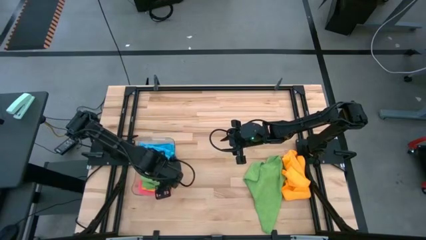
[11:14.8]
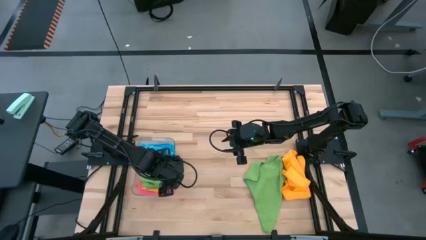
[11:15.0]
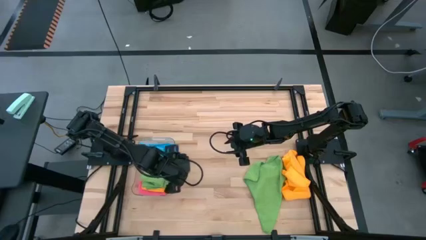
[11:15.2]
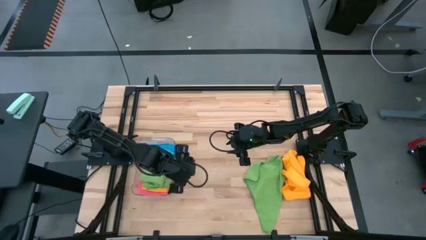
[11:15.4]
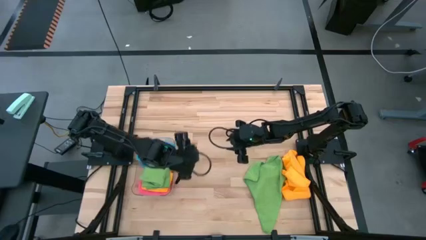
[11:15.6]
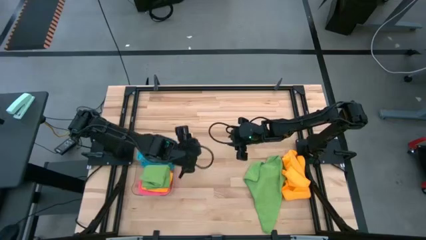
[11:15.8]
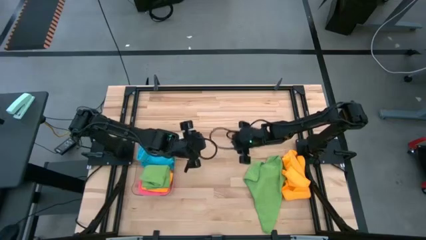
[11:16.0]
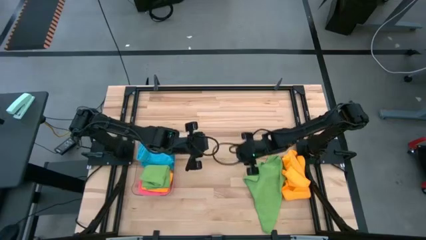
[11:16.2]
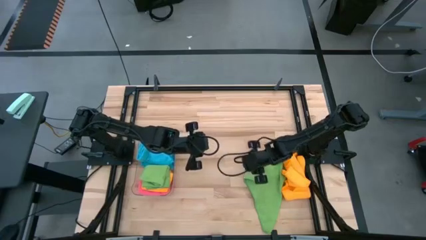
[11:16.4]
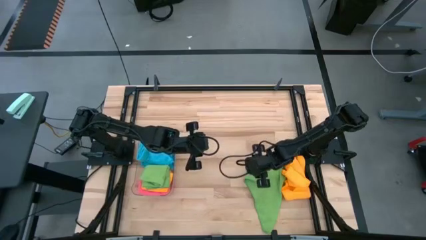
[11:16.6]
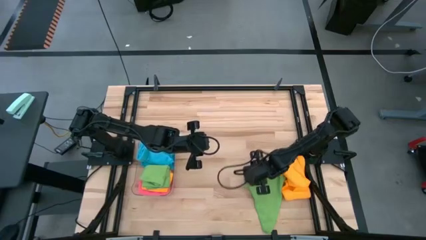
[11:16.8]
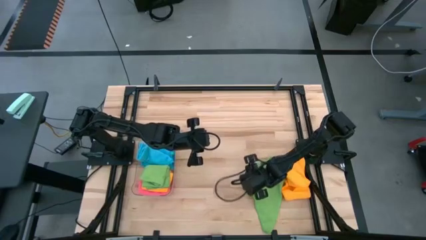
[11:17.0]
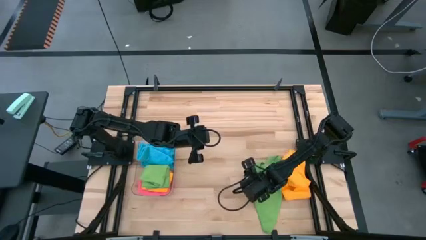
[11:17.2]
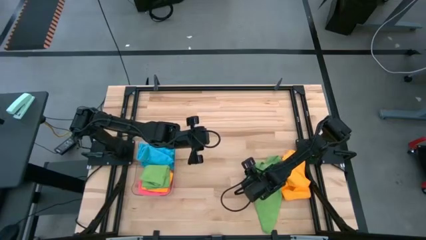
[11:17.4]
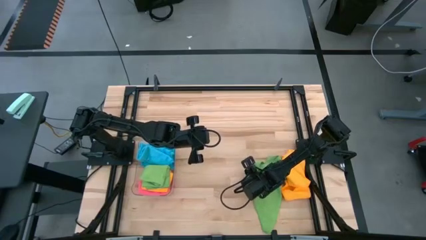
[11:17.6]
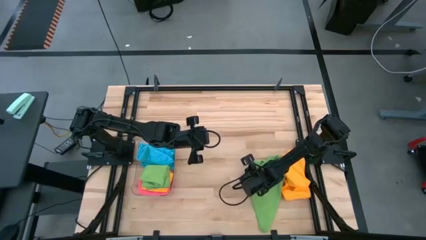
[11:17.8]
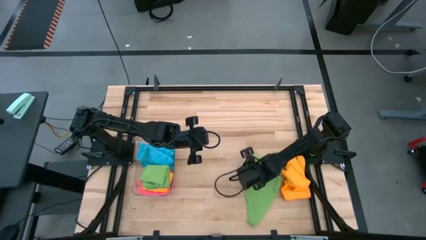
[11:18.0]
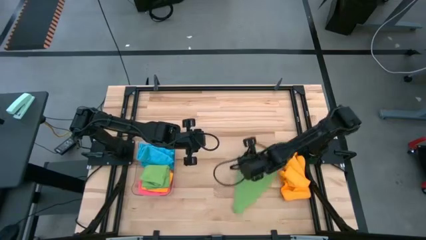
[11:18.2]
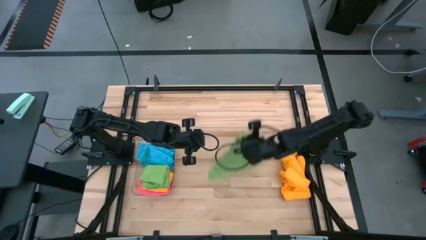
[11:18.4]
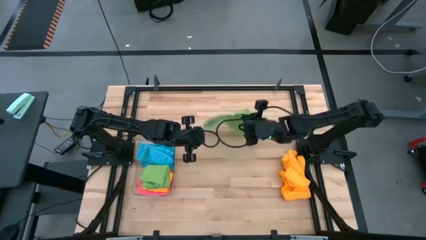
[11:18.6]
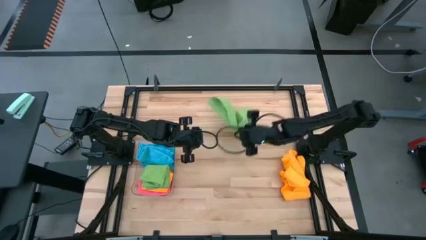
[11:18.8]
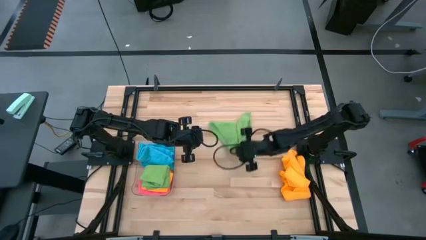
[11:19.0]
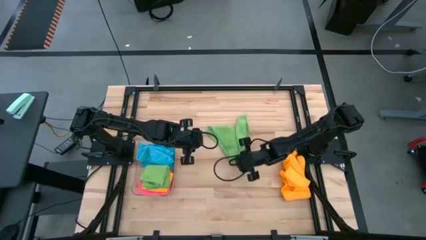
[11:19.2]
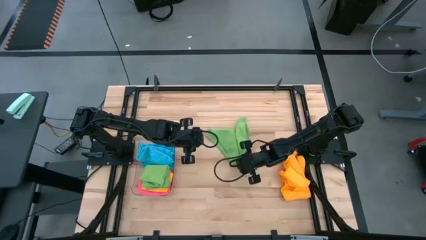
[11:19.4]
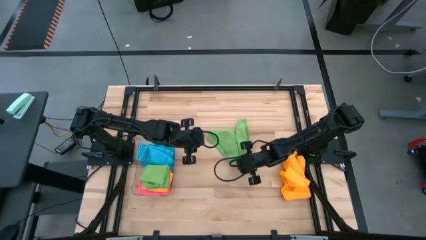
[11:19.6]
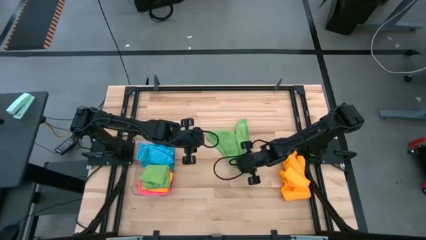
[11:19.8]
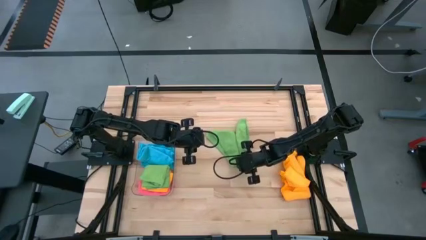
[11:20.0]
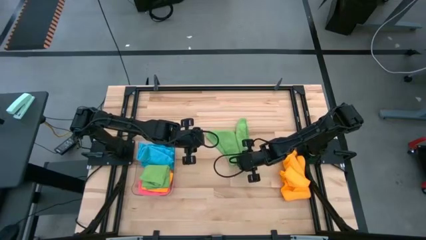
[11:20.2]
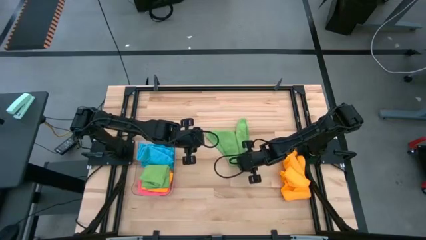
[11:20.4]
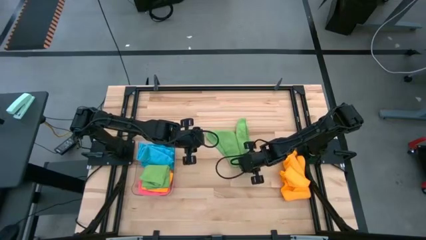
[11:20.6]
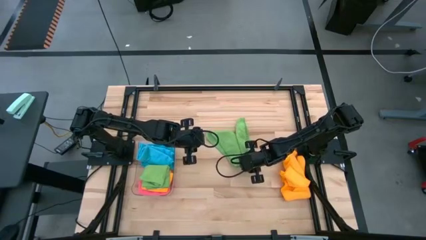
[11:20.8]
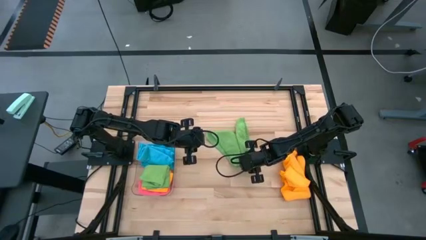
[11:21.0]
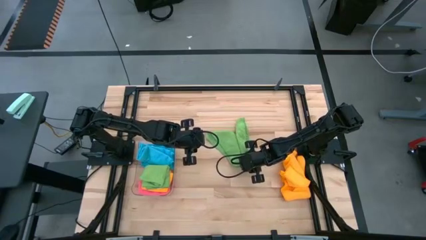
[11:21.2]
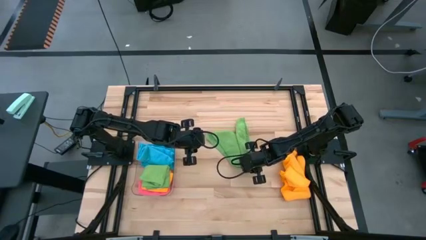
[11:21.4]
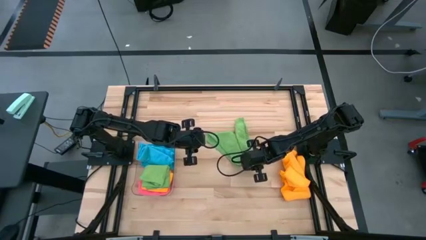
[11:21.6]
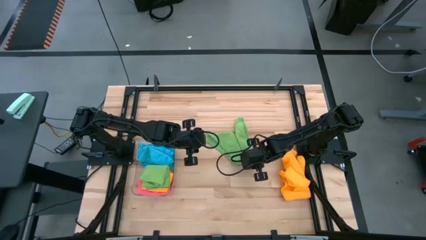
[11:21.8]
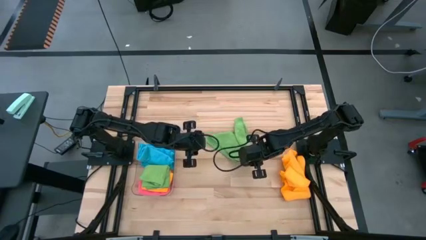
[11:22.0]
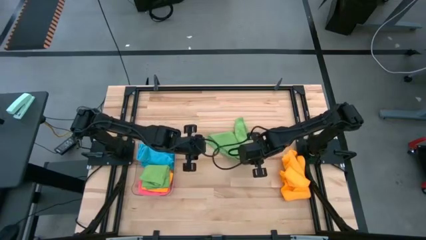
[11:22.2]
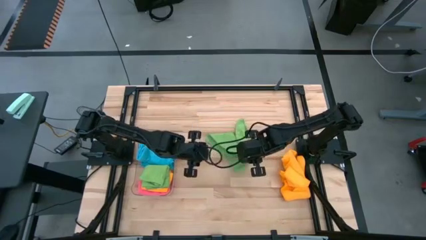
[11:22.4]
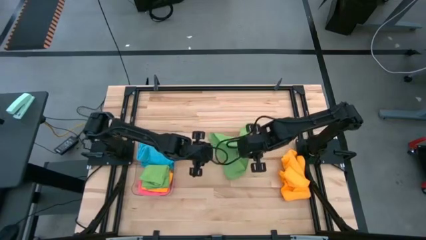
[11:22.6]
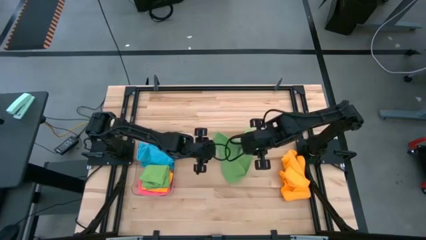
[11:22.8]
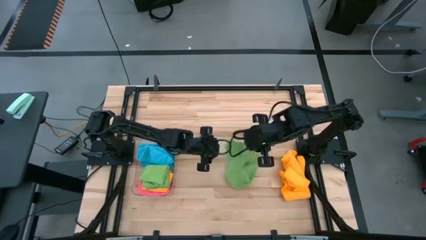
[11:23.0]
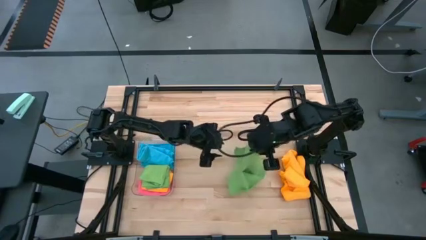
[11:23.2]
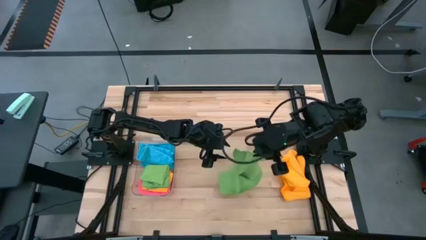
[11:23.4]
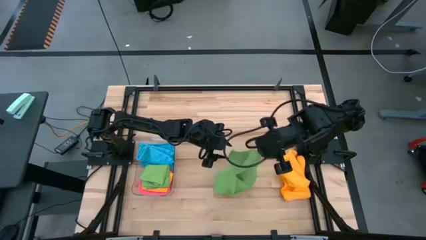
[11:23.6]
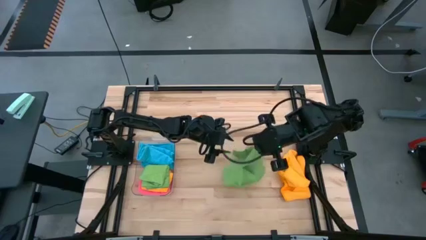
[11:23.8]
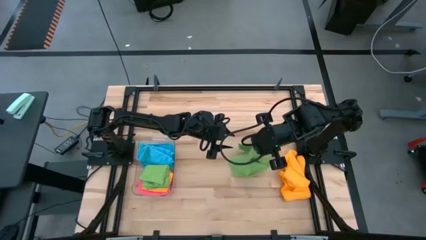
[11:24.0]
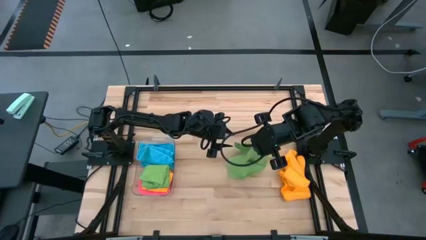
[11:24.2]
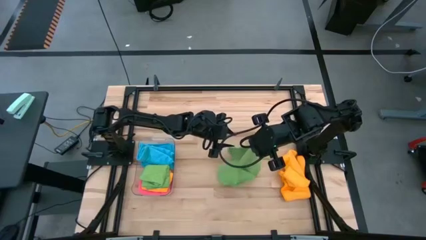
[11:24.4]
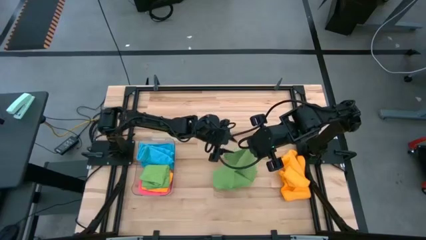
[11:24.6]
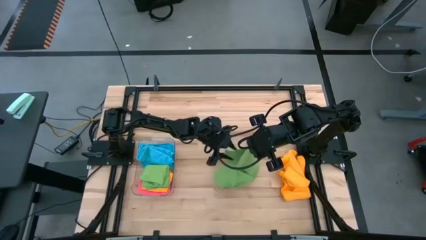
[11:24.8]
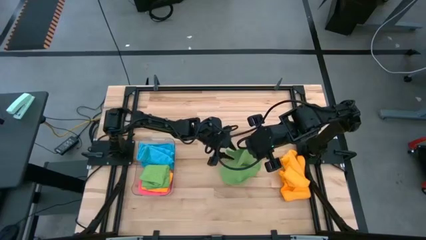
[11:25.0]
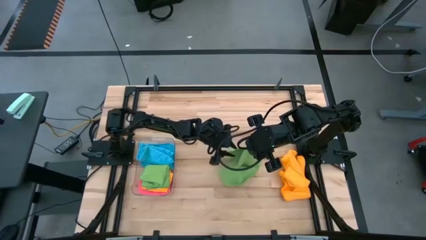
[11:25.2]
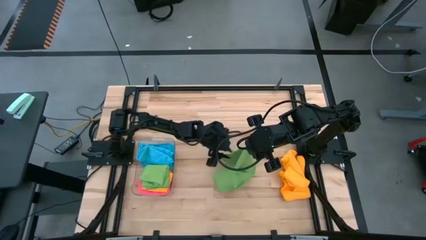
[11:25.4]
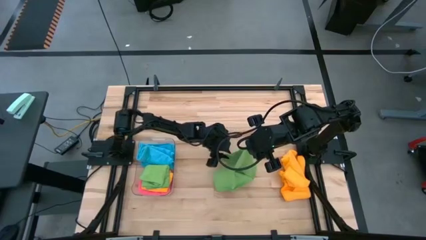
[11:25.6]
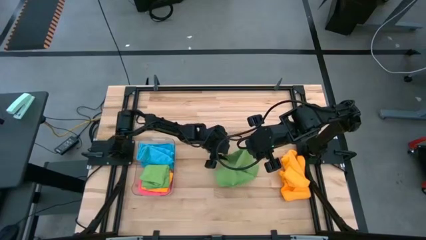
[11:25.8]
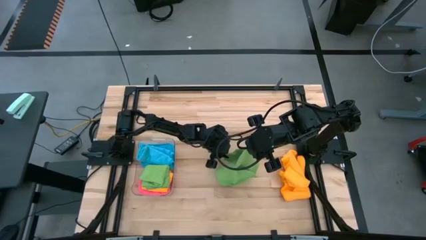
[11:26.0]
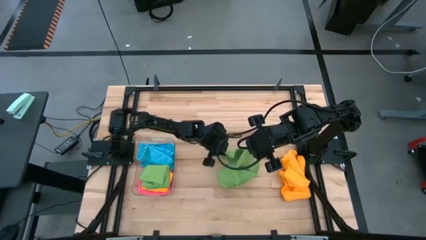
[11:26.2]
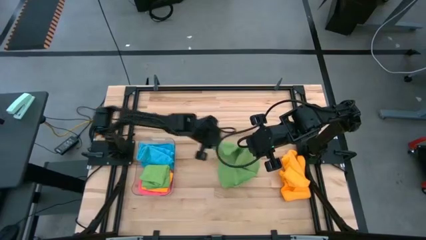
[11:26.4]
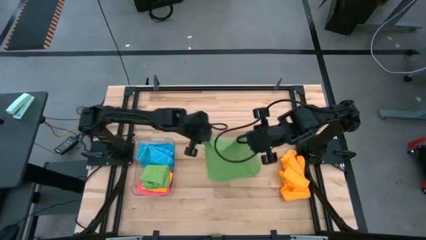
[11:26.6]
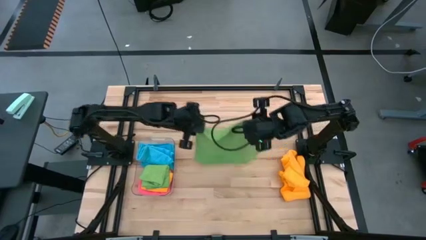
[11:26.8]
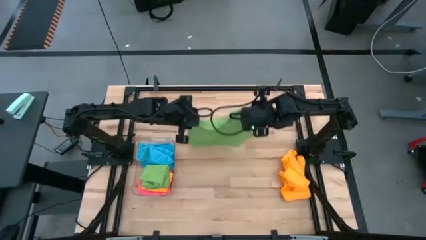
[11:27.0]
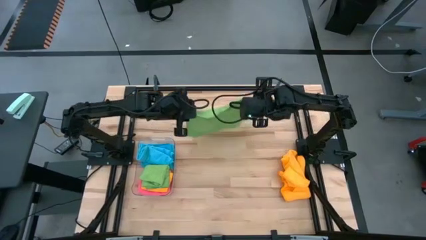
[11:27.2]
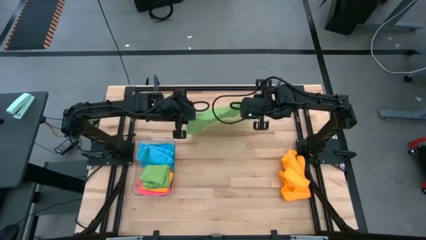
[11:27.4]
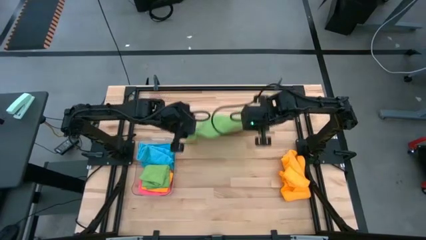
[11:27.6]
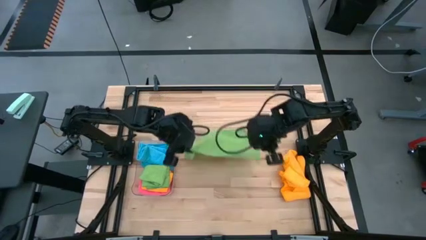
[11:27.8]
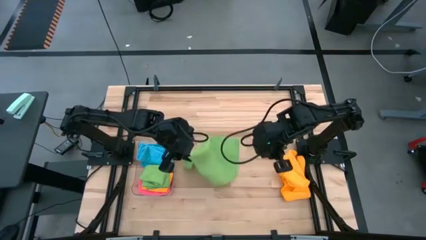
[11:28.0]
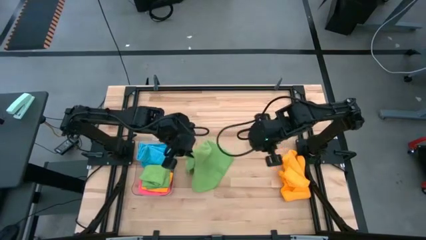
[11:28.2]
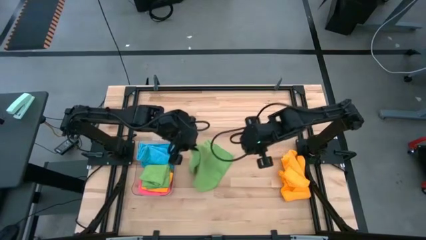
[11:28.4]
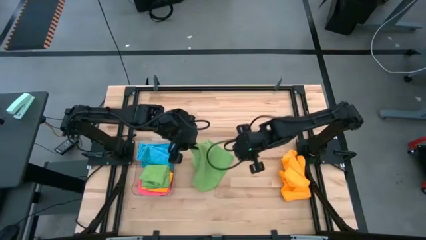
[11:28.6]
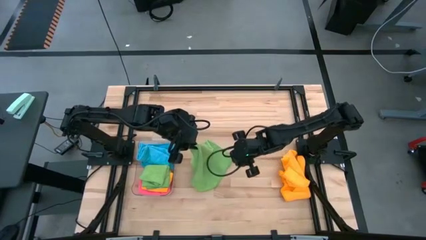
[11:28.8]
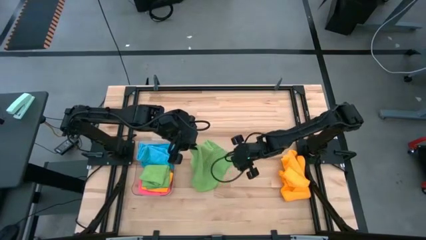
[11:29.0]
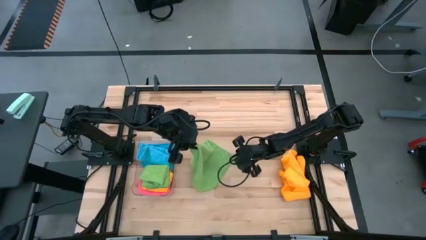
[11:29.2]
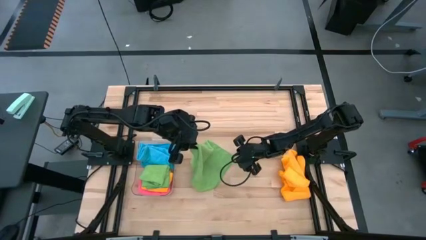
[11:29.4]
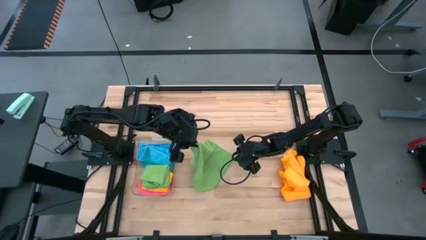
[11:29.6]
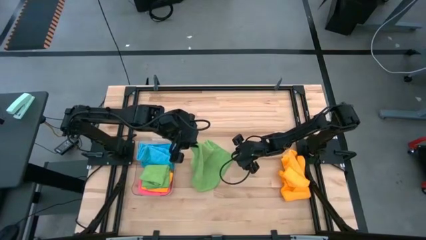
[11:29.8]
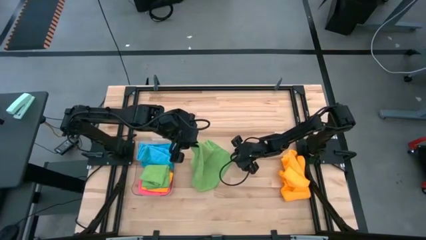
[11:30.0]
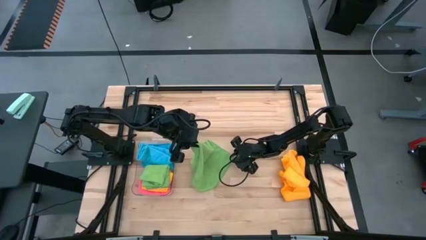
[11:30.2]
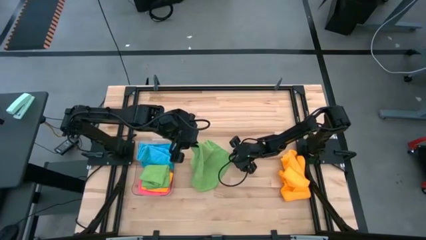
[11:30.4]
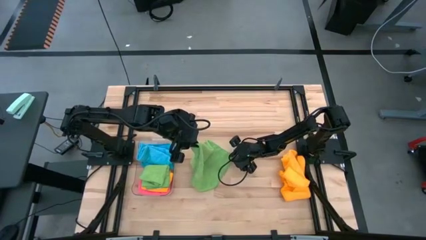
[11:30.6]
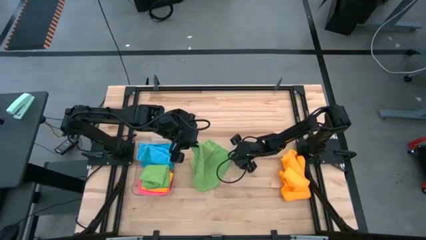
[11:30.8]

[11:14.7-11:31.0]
Task: Fold microfiber towels
Fold the green microfiber cloth
